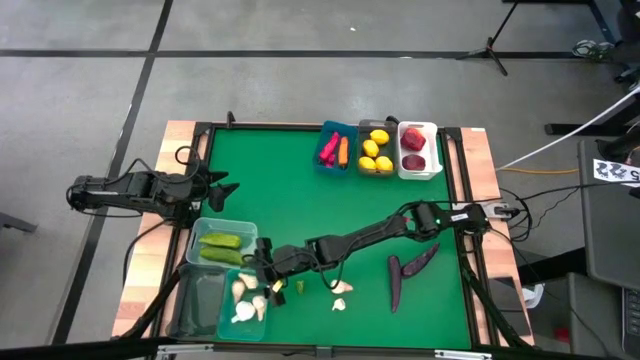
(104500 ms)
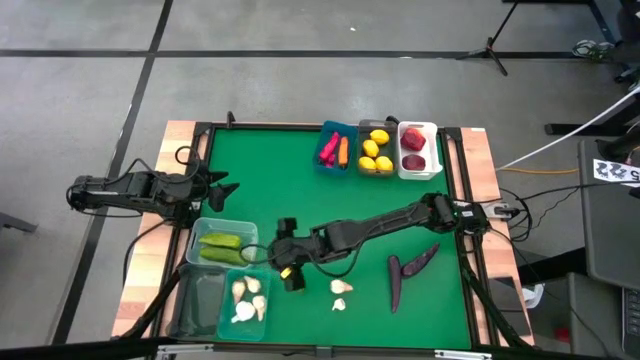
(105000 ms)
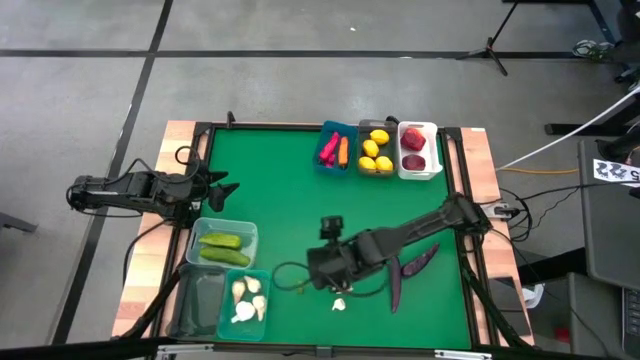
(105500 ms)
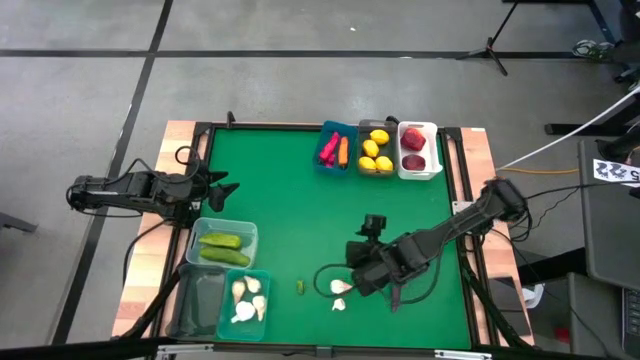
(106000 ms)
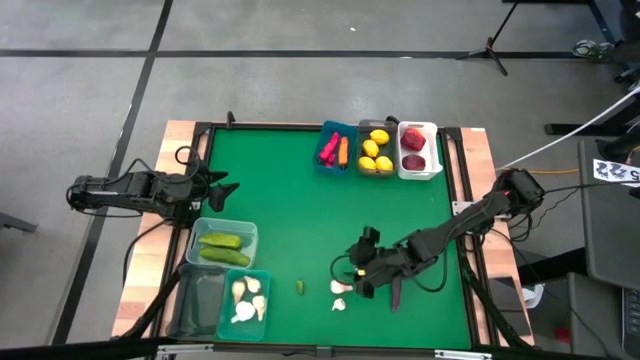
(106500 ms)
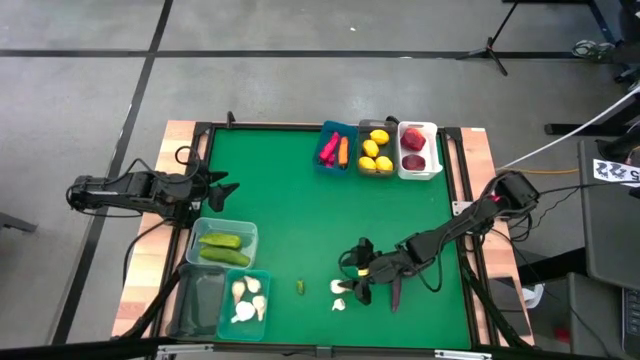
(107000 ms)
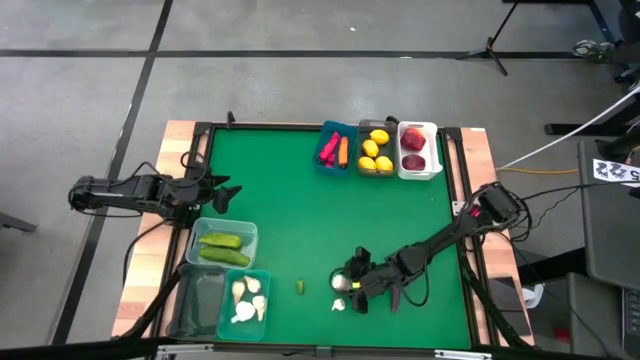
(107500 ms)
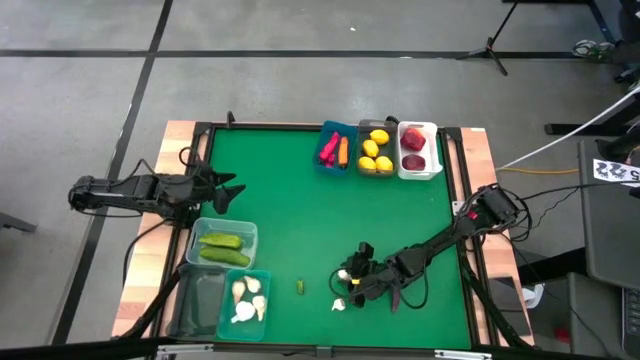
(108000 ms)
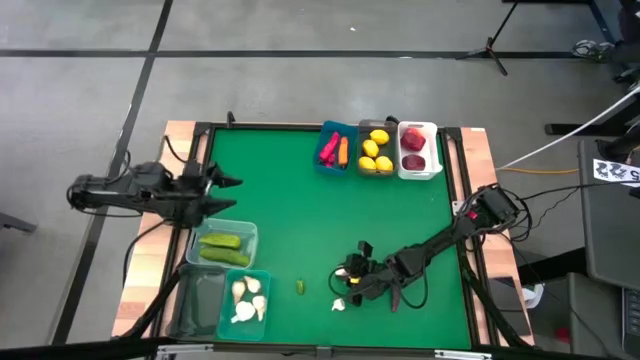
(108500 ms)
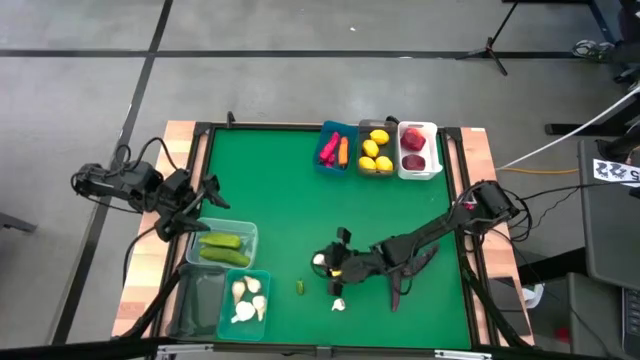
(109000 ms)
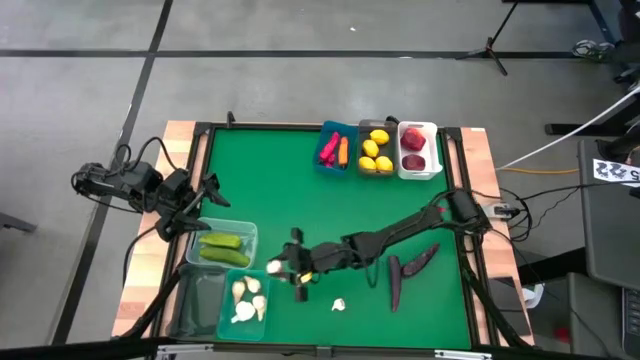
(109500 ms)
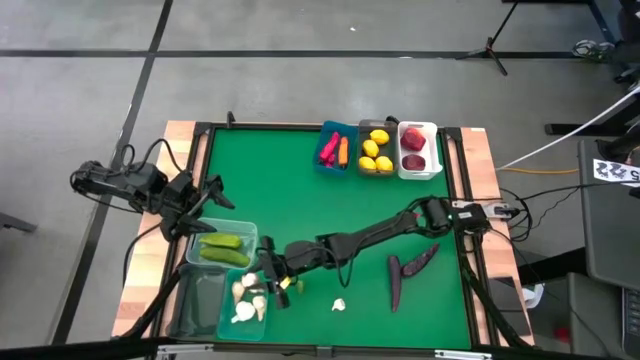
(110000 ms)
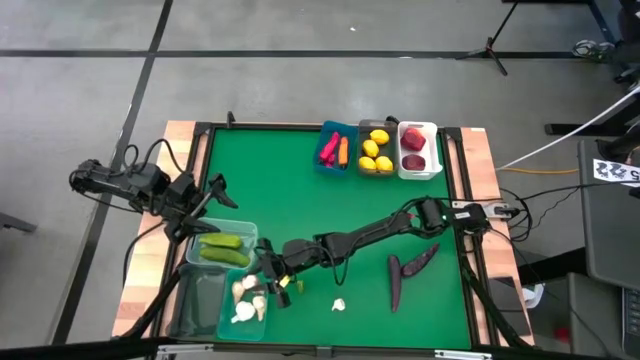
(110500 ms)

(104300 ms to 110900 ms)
Task: Sort produce into baskets
Put the white garlic into the green bin

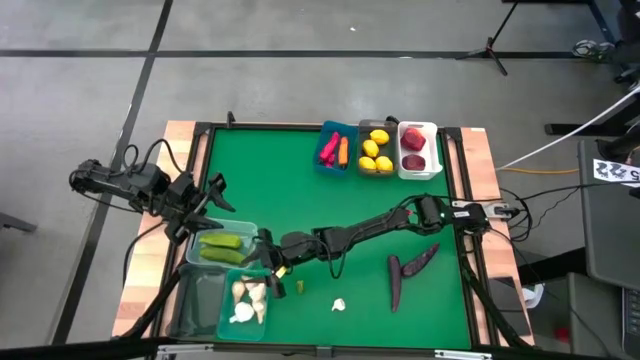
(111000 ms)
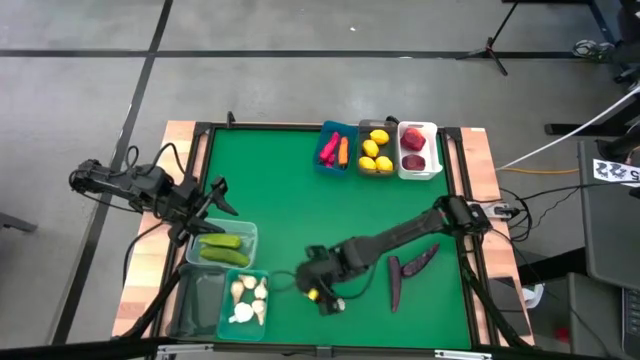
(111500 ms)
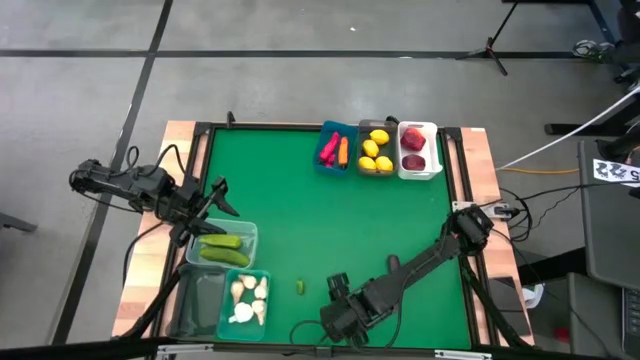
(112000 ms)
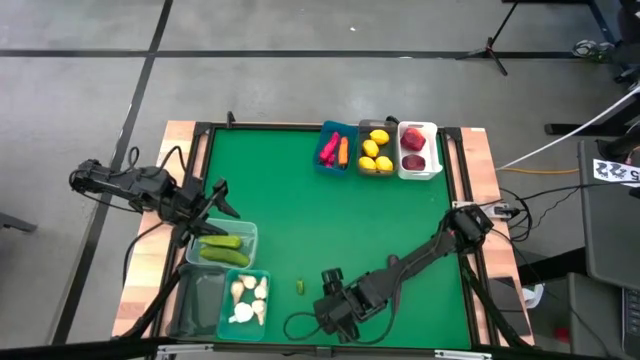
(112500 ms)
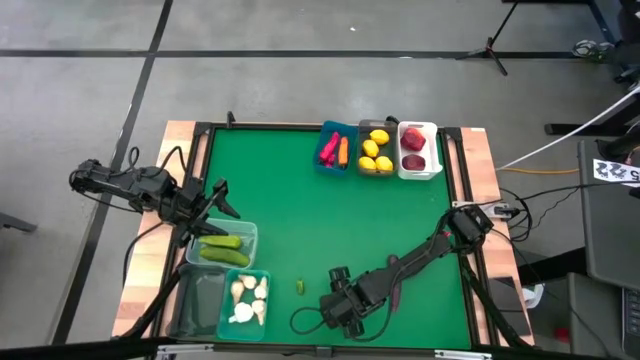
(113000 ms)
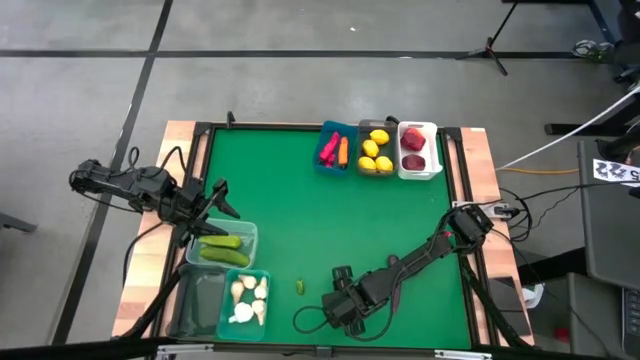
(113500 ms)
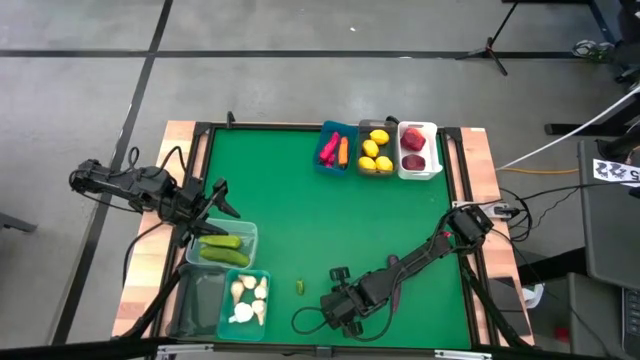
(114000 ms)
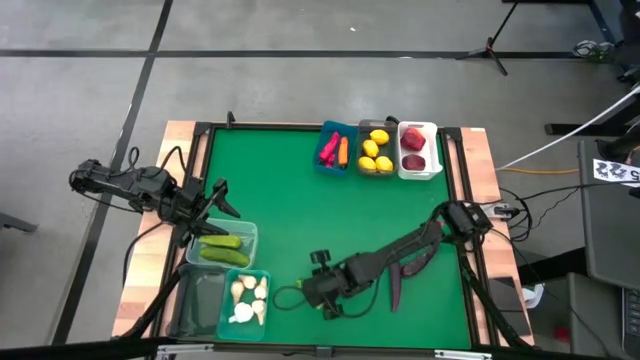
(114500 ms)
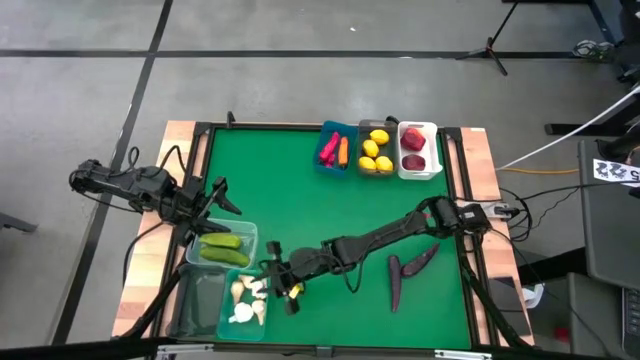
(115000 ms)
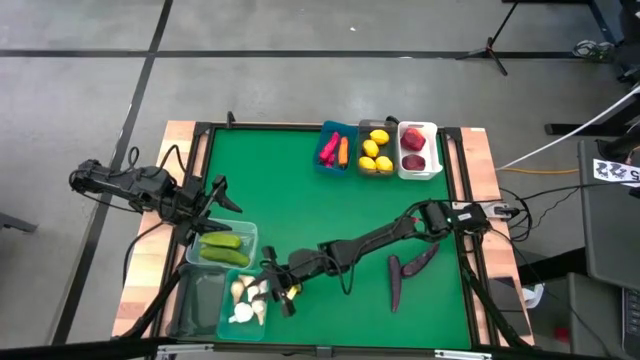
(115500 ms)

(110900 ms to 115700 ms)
Put the white garlic into the green bin

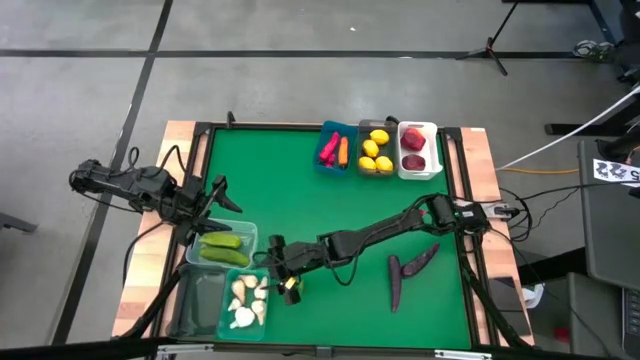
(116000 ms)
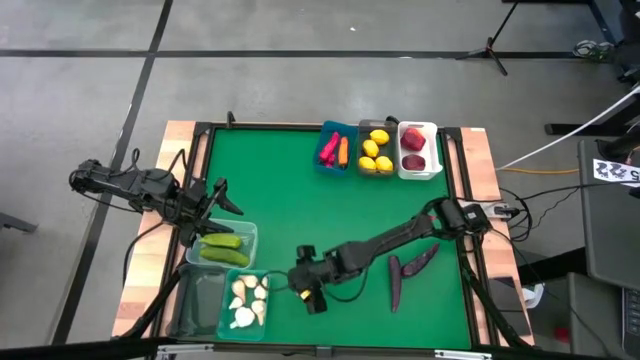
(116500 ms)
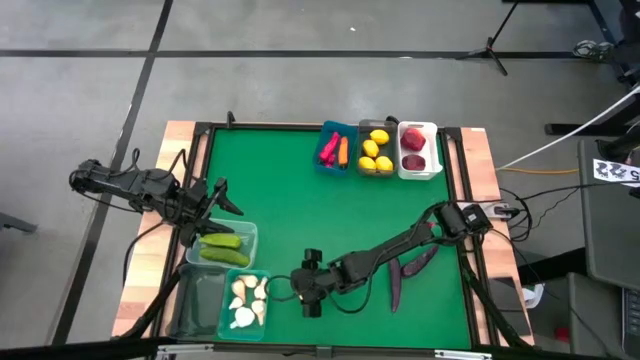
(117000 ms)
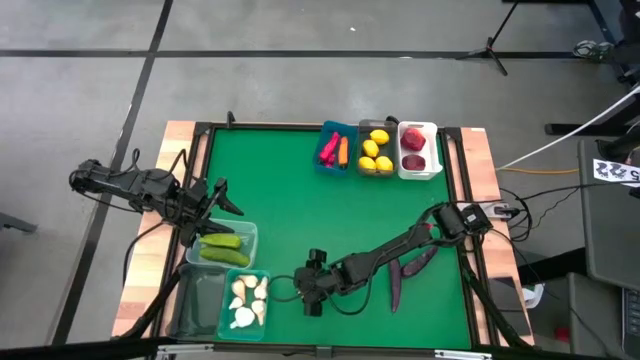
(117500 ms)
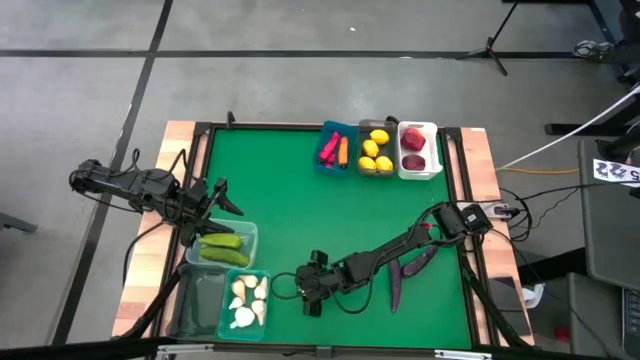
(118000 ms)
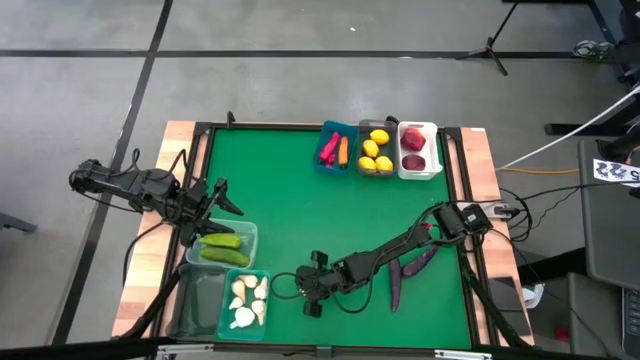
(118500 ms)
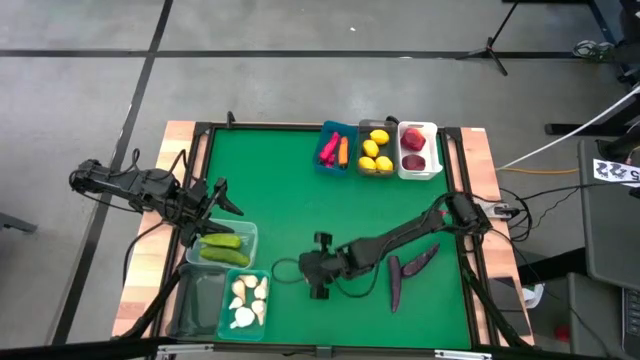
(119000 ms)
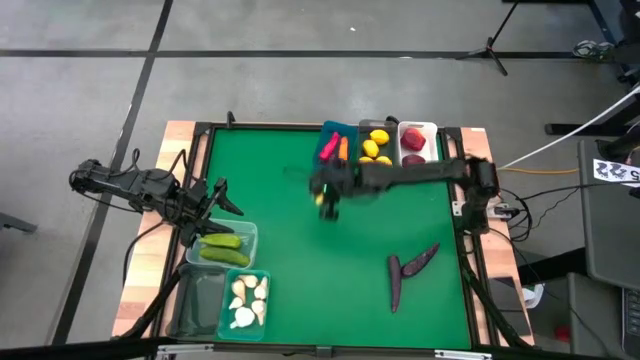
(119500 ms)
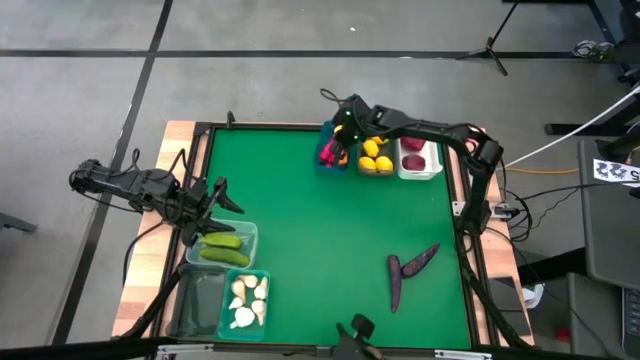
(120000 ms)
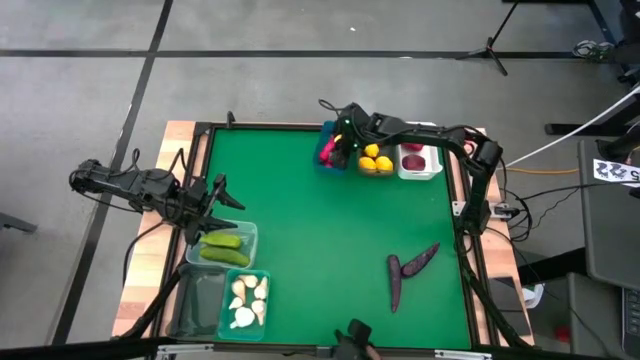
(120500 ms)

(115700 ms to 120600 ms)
Put the green chili paper into the blue bin

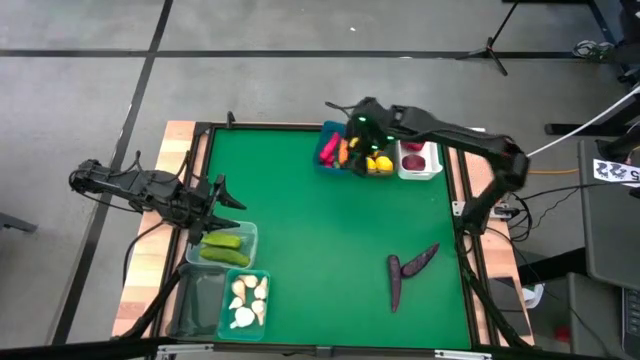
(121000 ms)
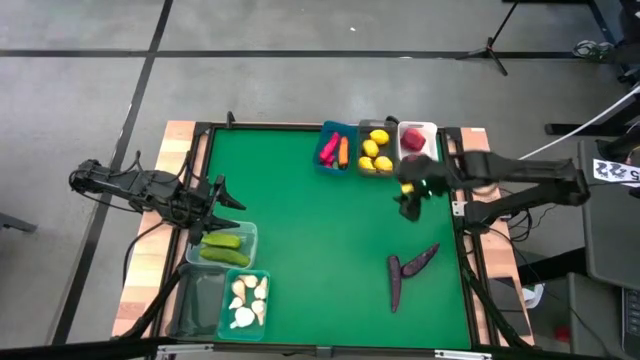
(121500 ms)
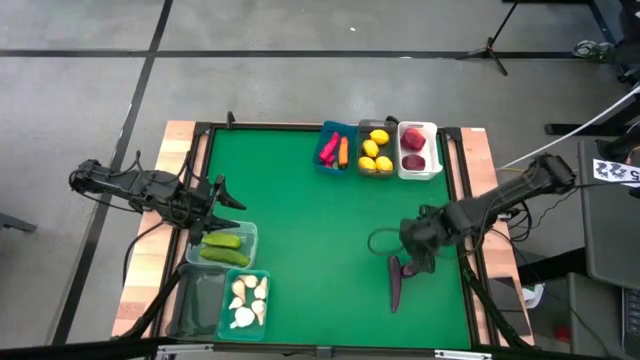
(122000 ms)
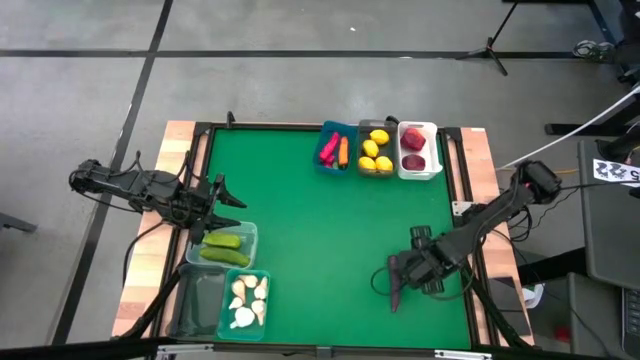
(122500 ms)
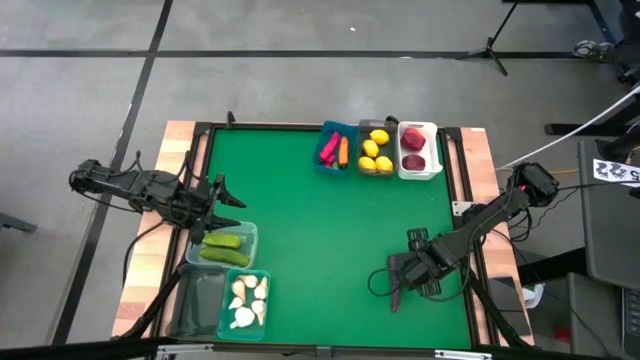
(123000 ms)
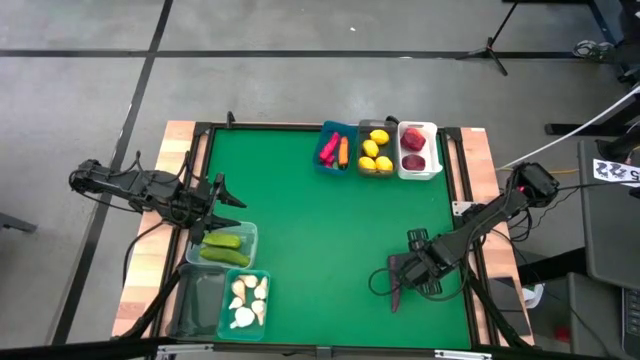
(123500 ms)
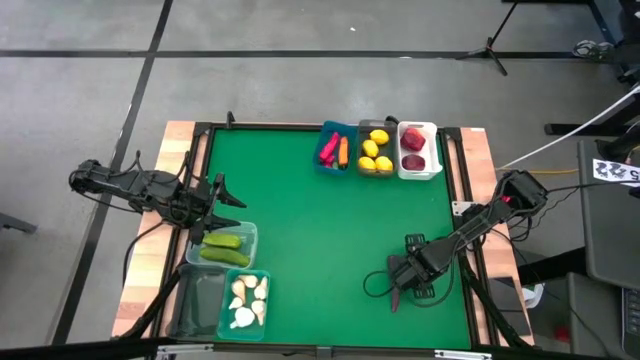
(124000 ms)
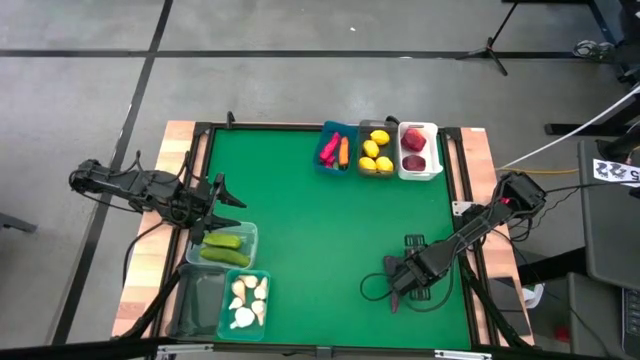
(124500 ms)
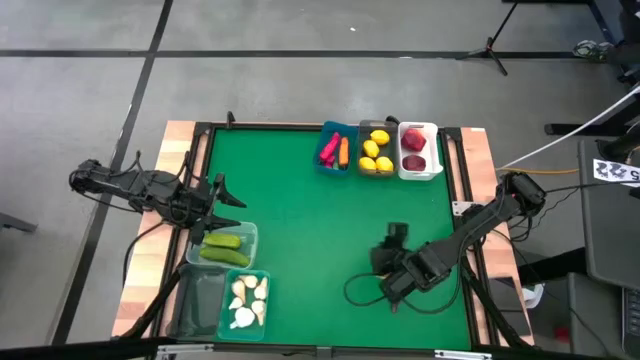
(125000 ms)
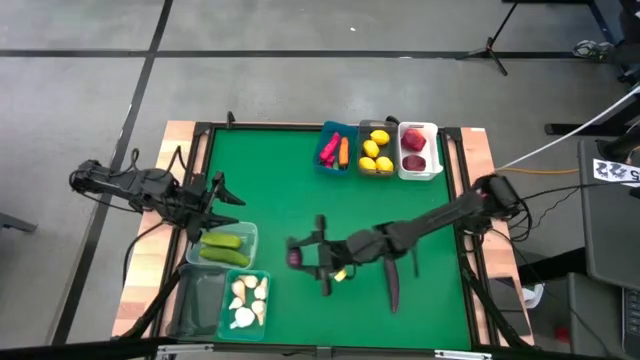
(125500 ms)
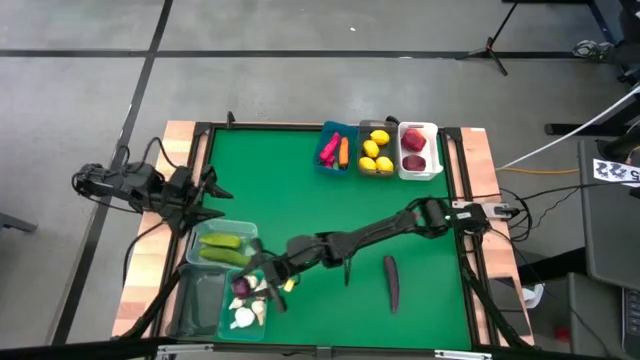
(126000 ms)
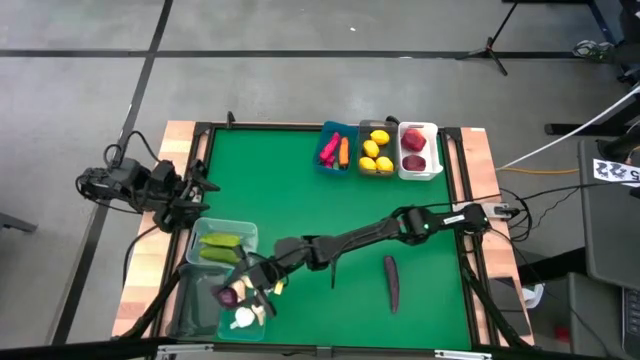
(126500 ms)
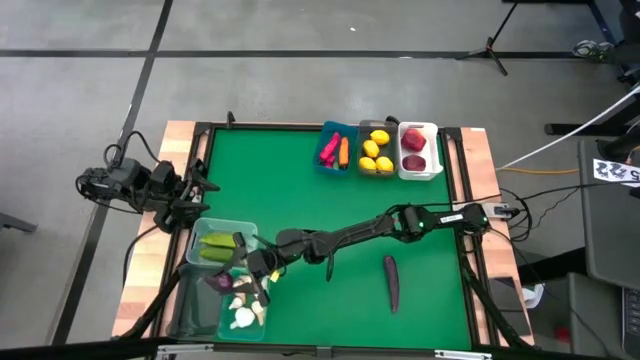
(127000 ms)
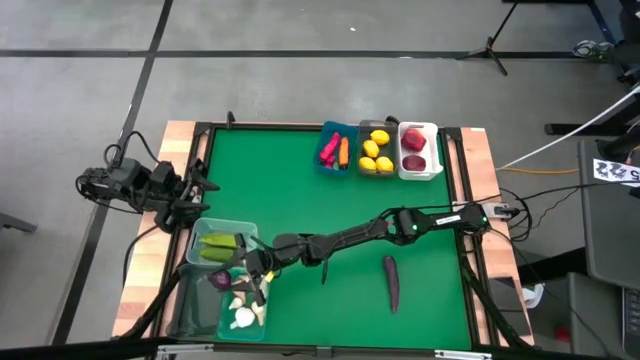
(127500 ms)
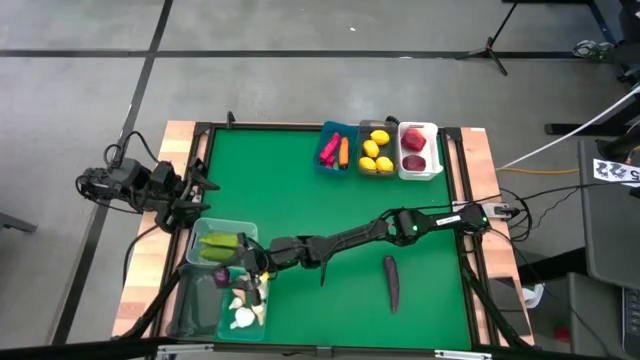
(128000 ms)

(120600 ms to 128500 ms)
Put the violet eggplant into the bottom black bin
